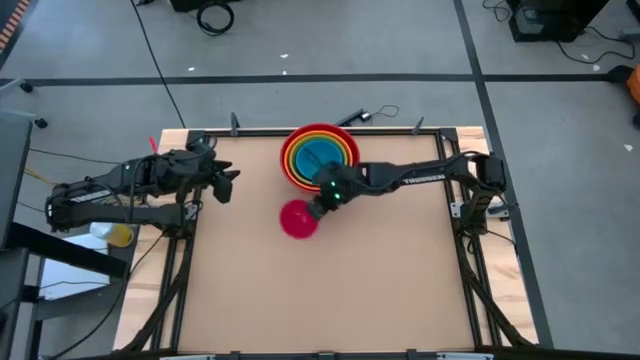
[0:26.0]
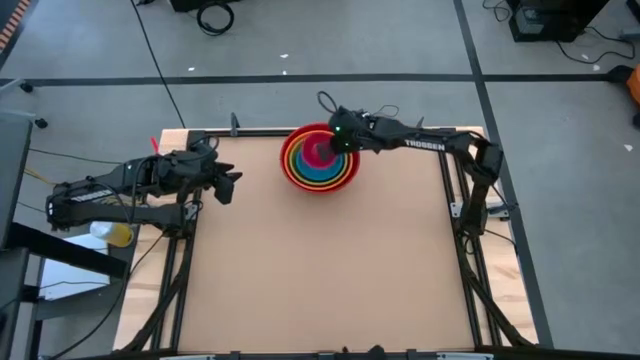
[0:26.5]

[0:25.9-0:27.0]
Stack the pink bowl on top of the blue bowl

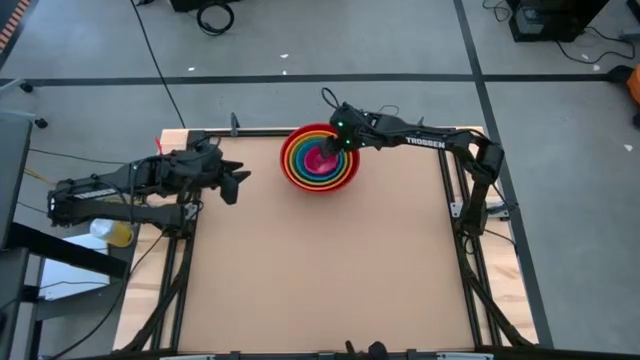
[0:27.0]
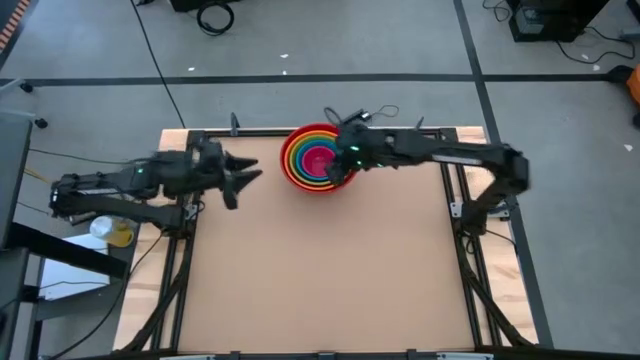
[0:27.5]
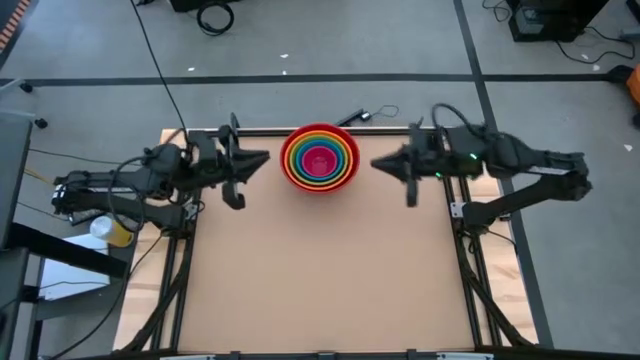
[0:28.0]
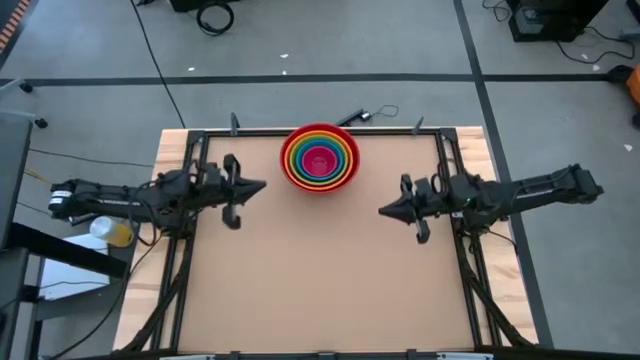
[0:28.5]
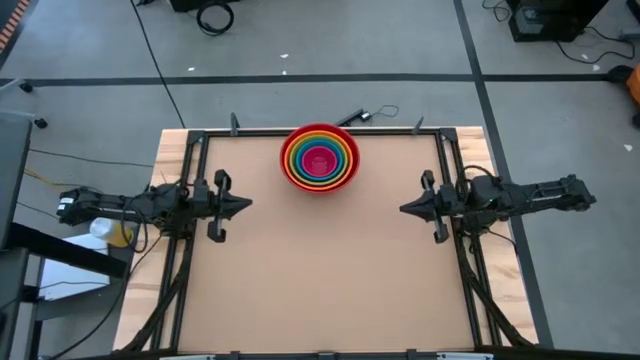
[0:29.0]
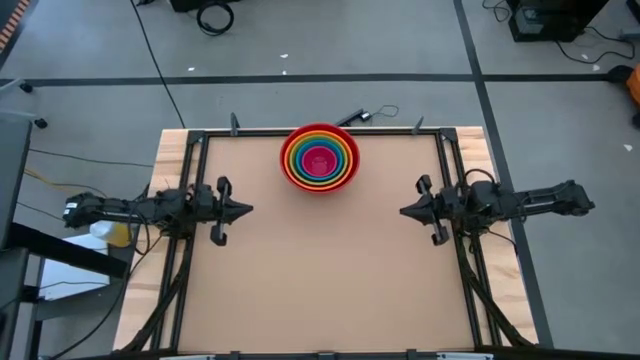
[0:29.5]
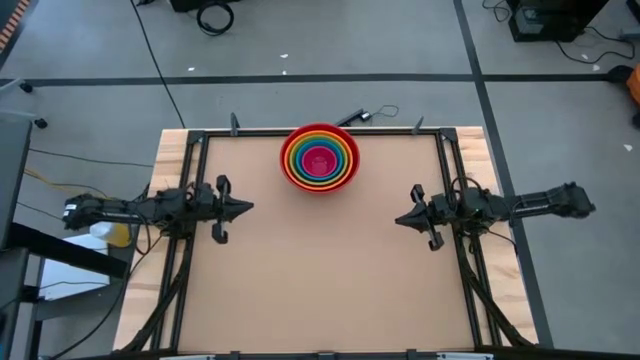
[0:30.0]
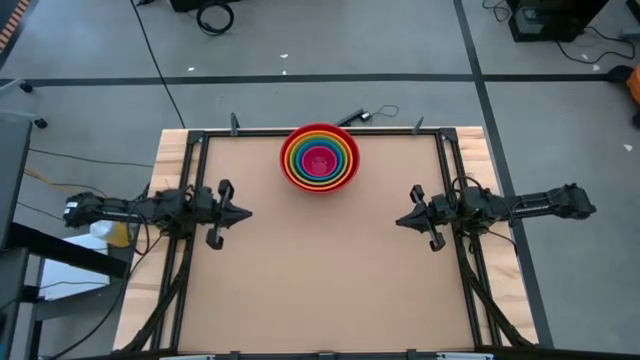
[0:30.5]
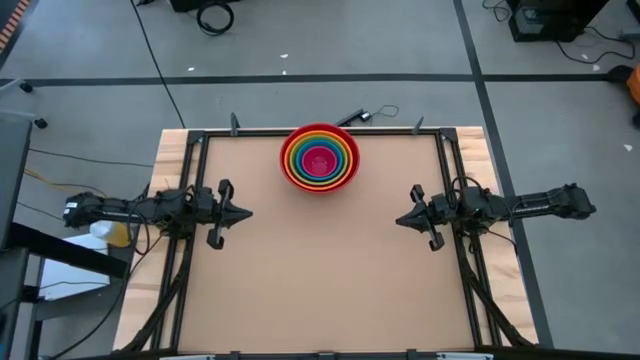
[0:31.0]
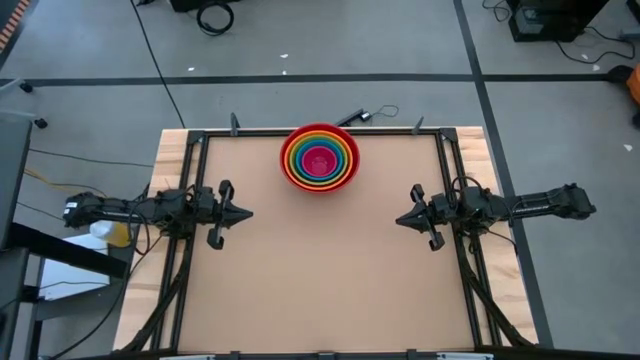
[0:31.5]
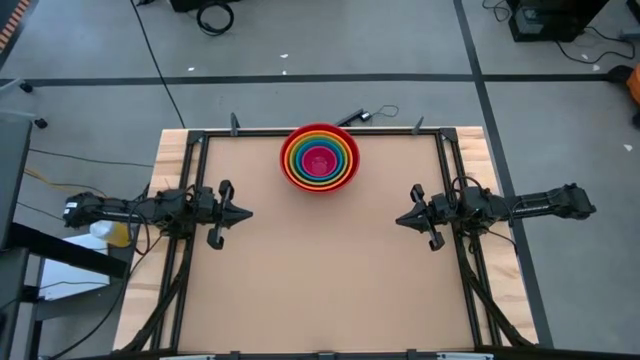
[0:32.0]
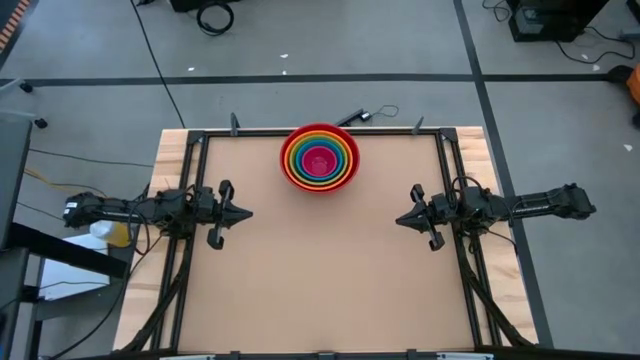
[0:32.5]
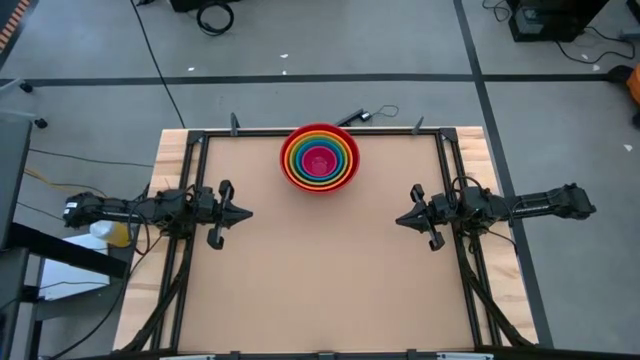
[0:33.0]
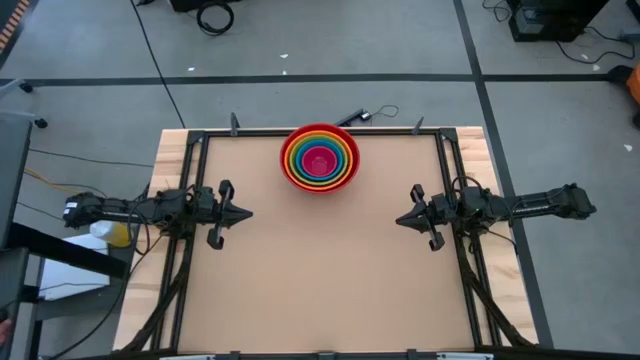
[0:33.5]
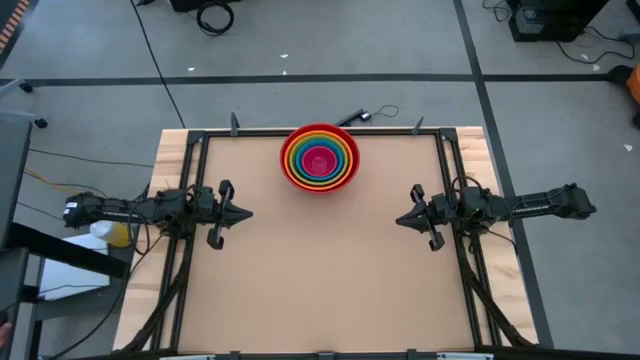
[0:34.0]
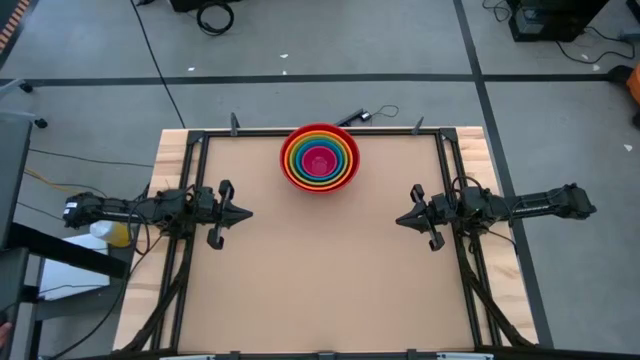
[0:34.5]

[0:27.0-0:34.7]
Return to Home Position

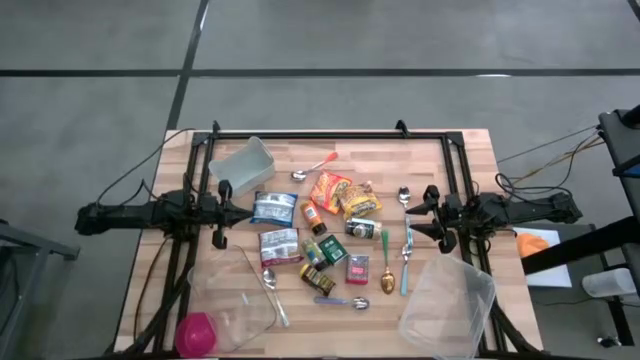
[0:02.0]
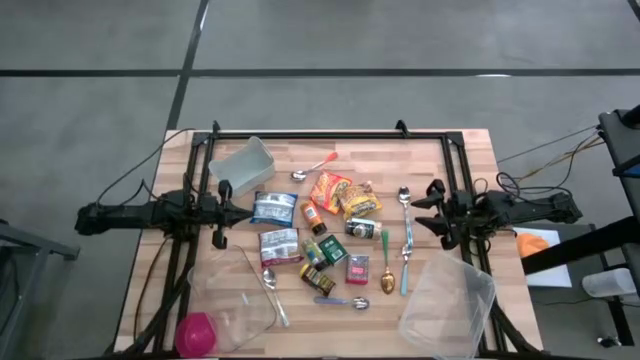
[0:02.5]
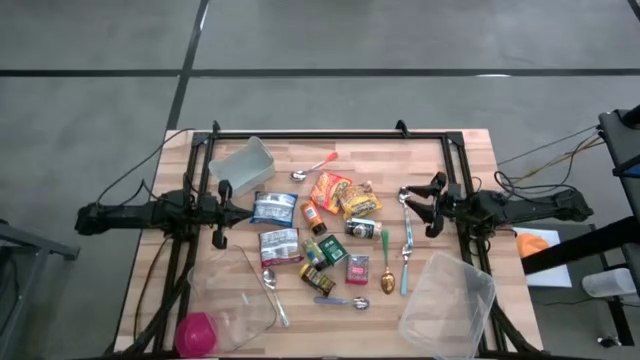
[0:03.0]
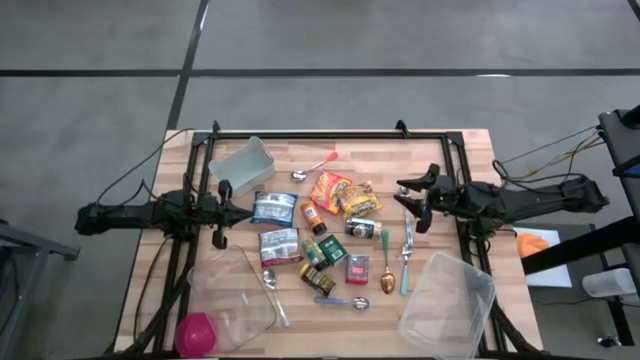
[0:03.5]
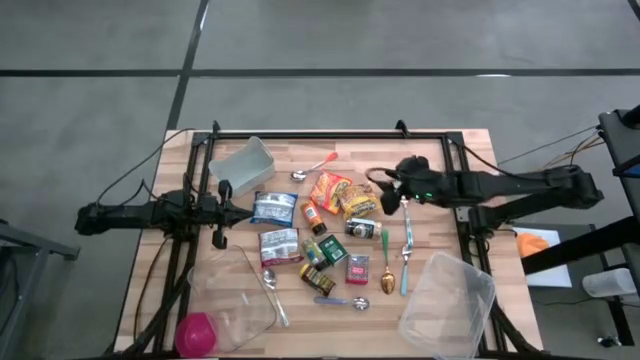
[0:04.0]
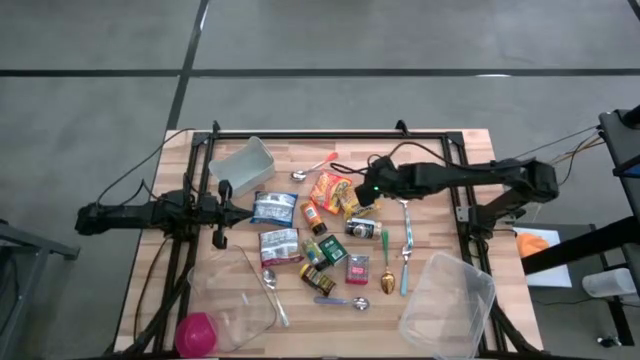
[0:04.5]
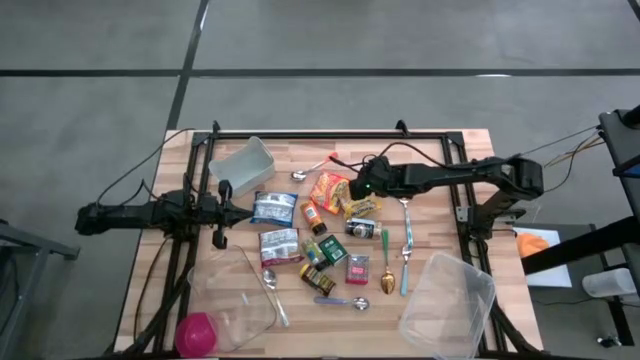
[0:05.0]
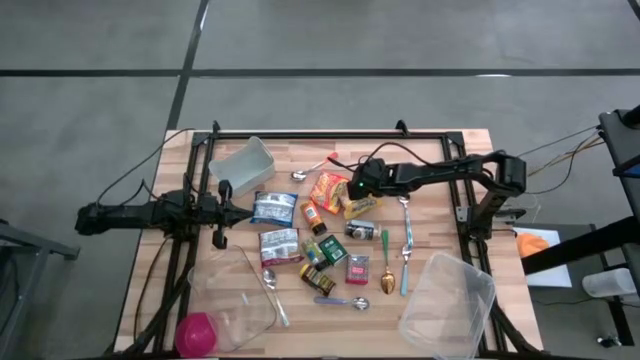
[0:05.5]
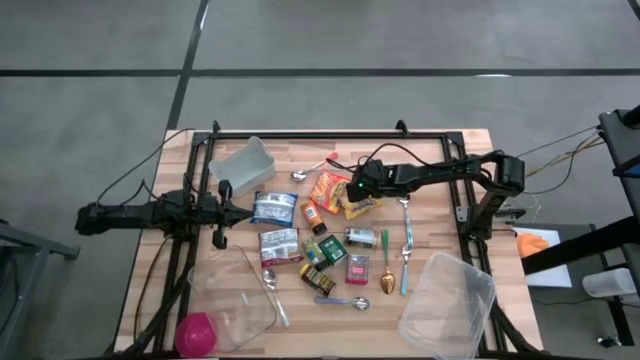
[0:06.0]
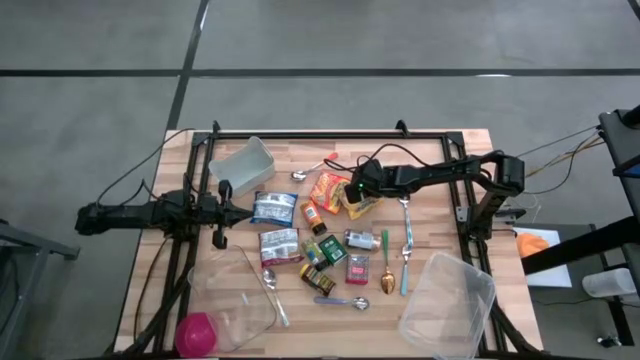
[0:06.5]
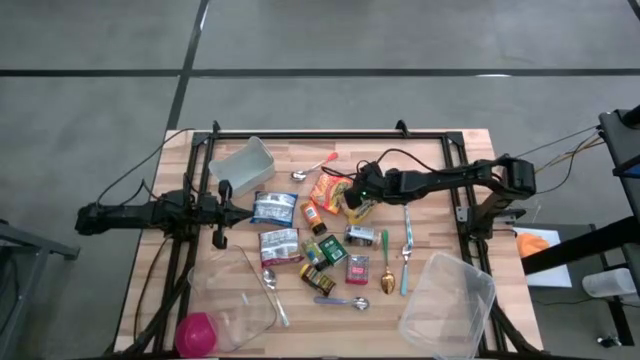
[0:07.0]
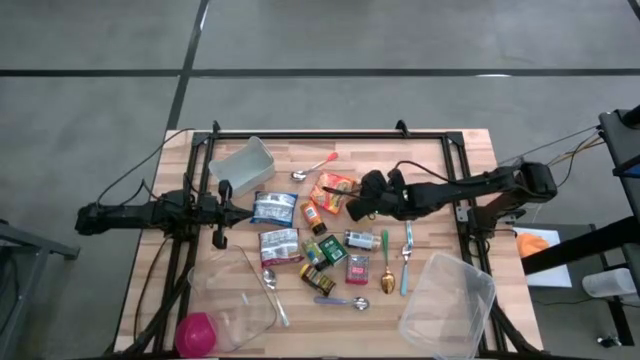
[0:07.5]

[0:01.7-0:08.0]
Put the yellow noodle pack into the transparent bin

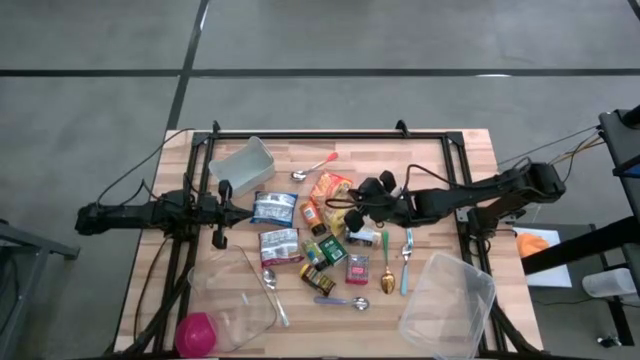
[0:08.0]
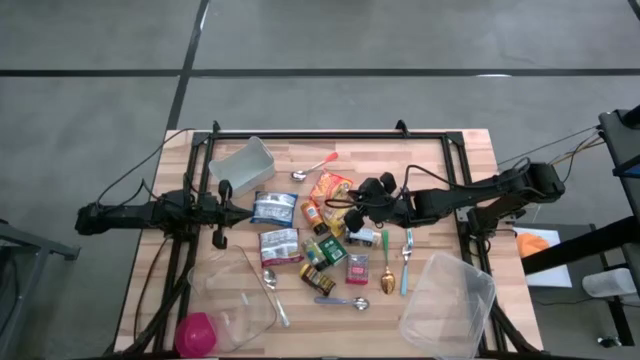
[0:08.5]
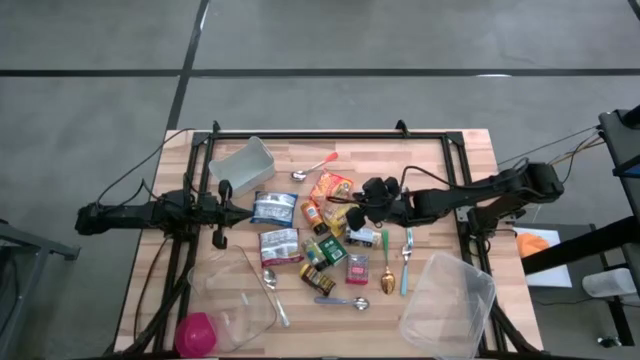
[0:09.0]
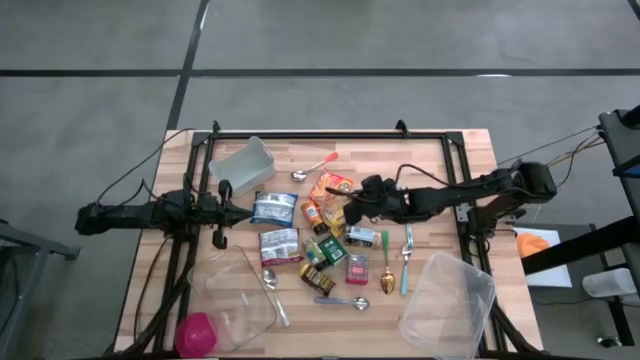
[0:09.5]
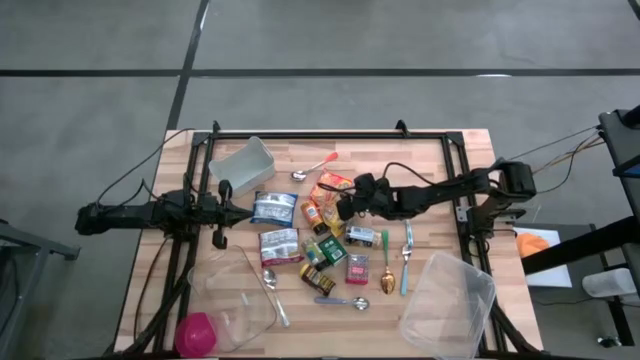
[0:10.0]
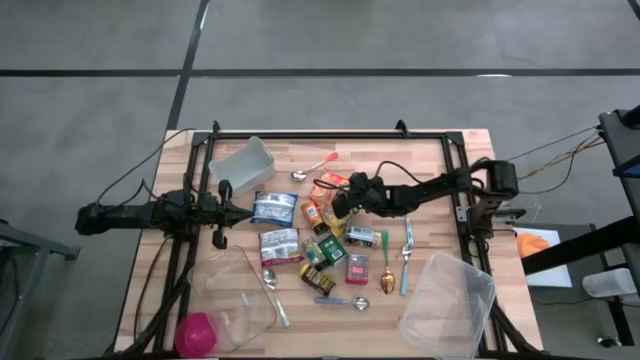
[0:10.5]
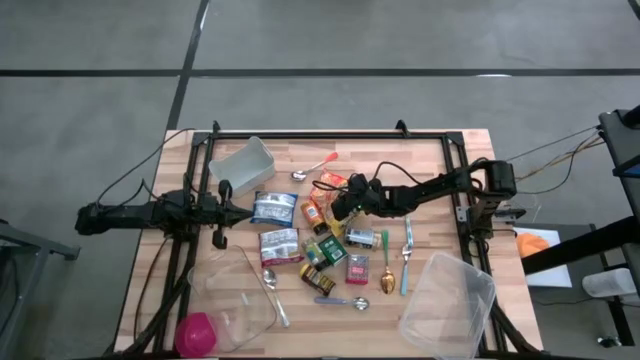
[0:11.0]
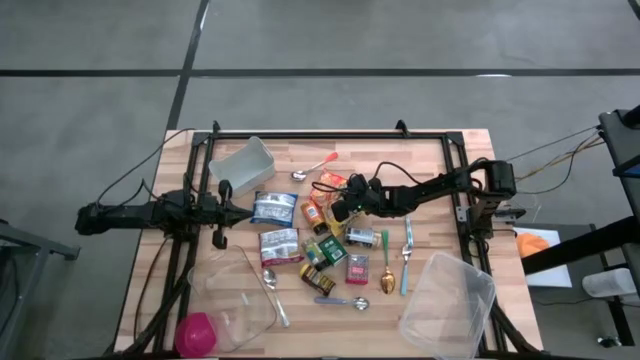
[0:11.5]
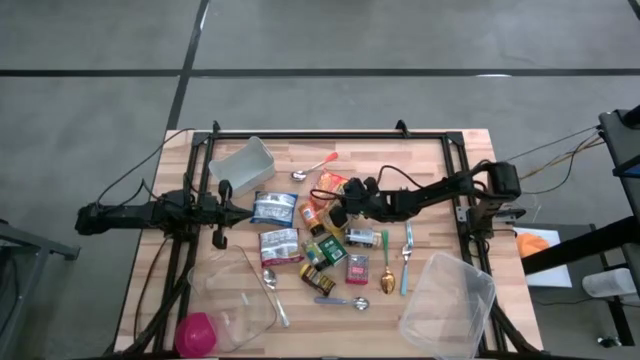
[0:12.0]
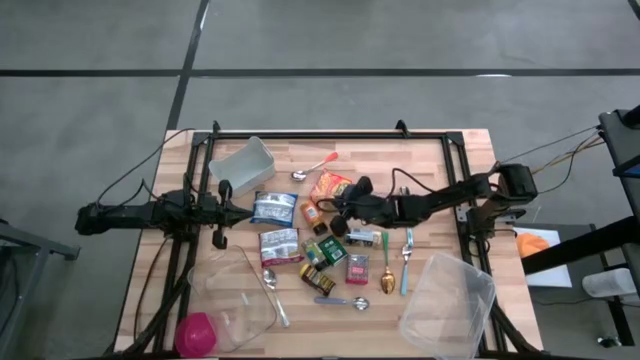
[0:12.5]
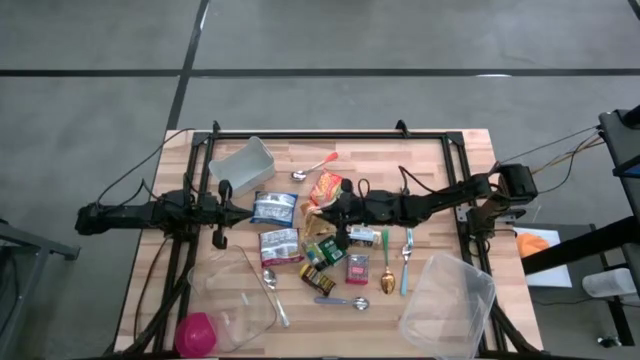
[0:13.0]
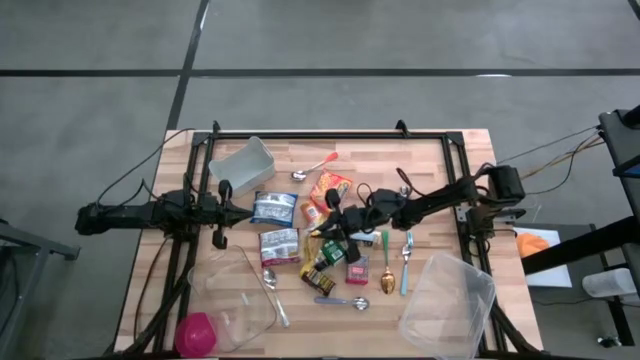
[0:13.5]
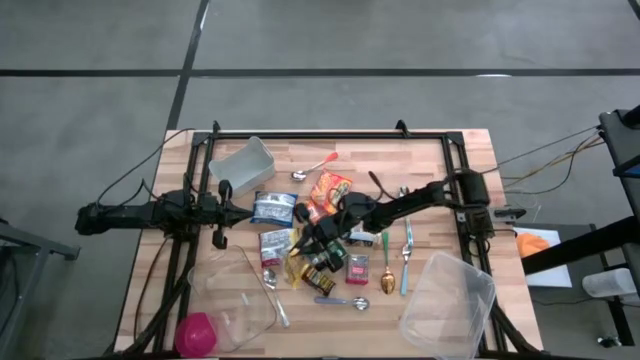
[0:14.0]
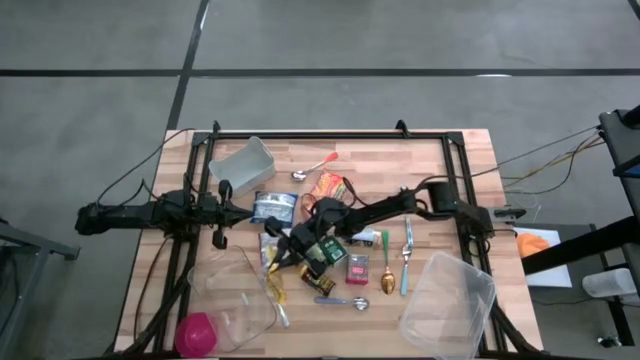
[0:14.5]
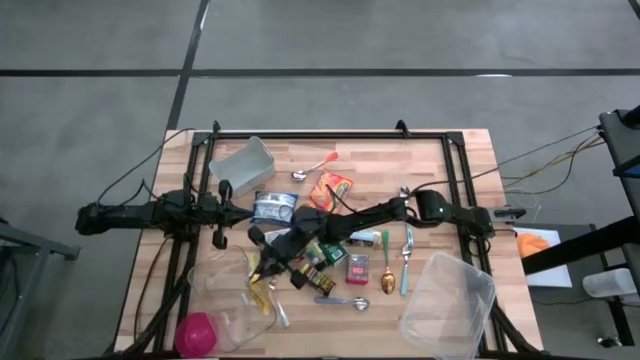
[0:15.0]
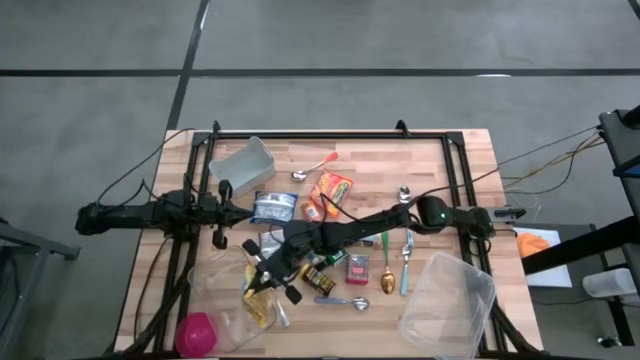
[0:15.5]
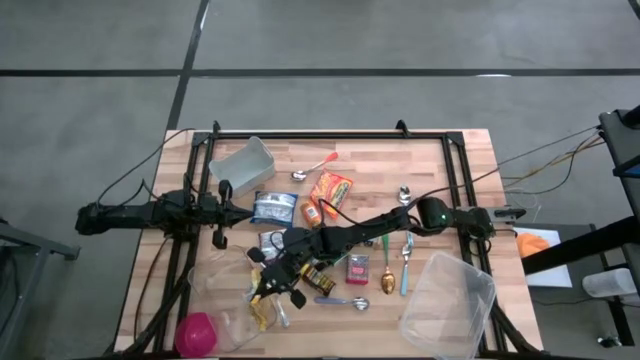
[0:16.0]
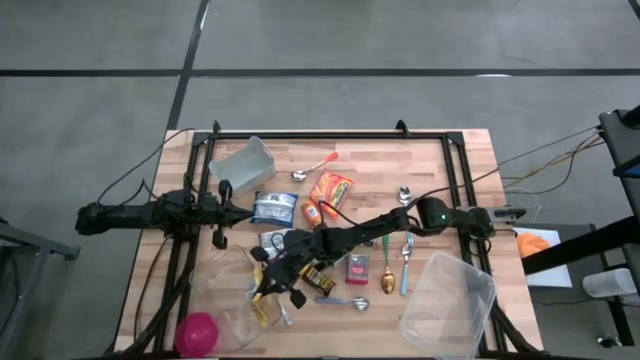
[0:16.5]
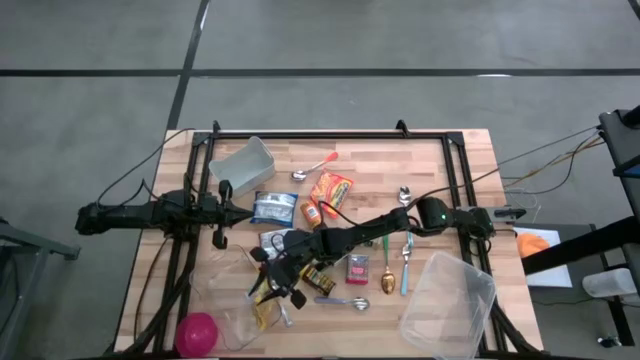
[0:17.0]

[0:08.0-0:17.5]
Put the yellow noodle pack into the transparent bin
